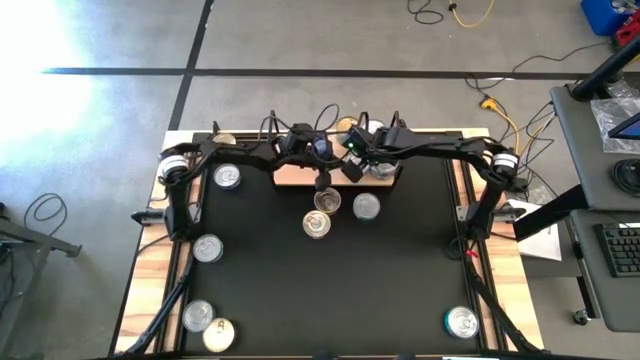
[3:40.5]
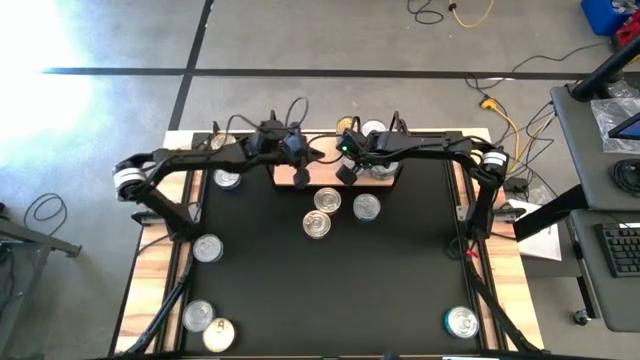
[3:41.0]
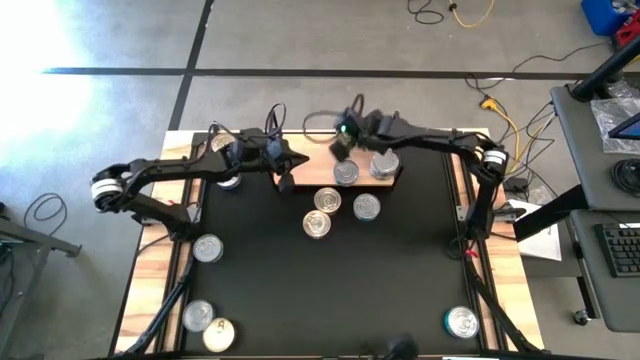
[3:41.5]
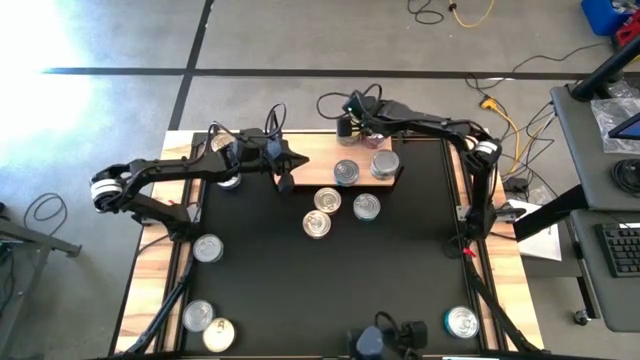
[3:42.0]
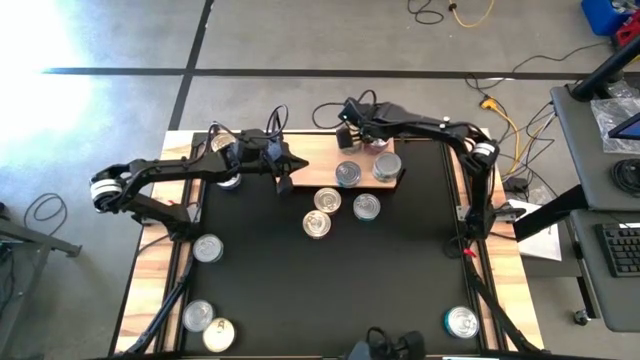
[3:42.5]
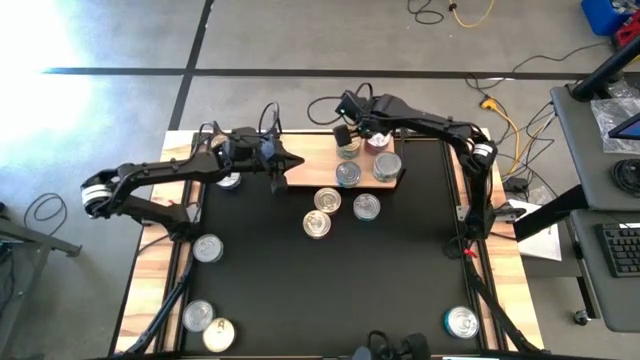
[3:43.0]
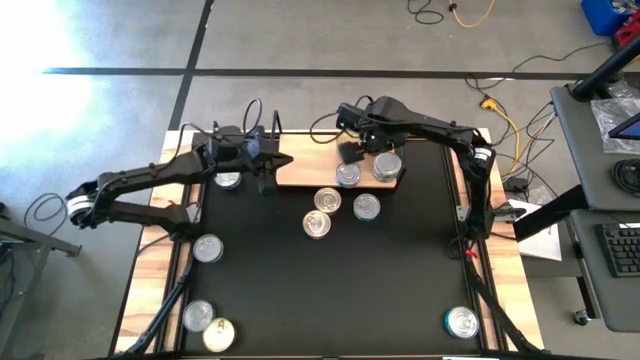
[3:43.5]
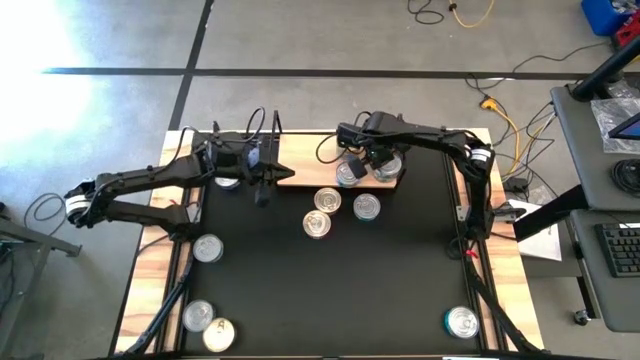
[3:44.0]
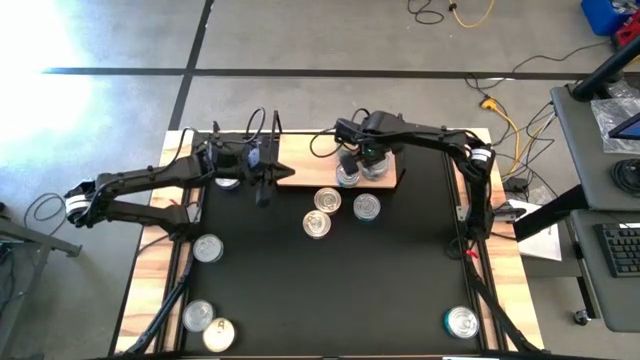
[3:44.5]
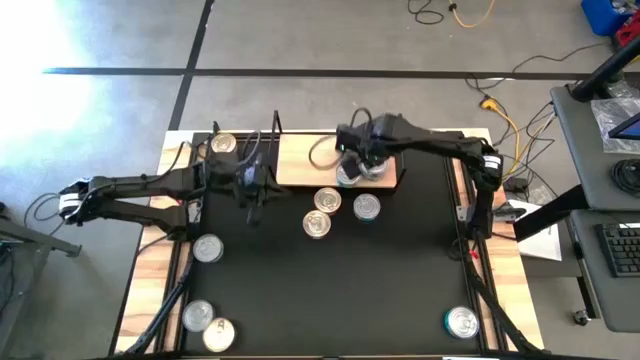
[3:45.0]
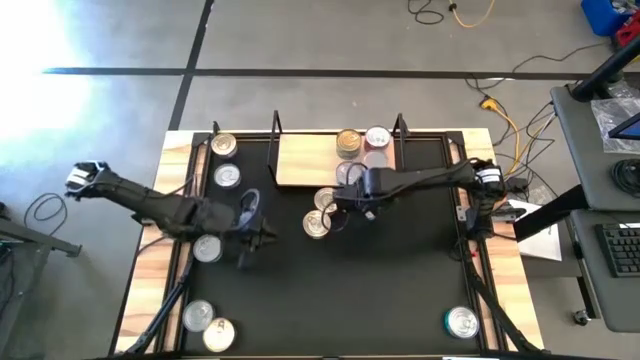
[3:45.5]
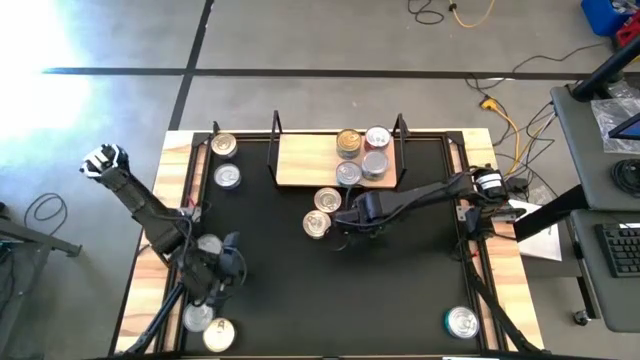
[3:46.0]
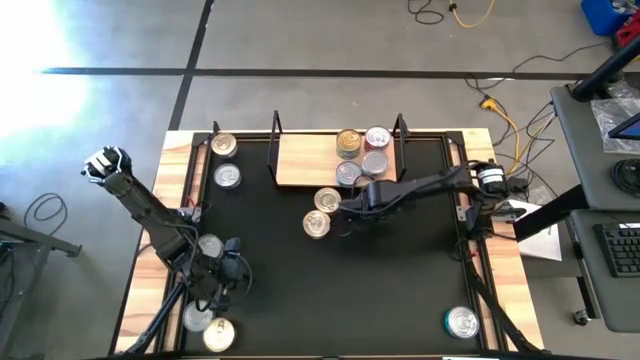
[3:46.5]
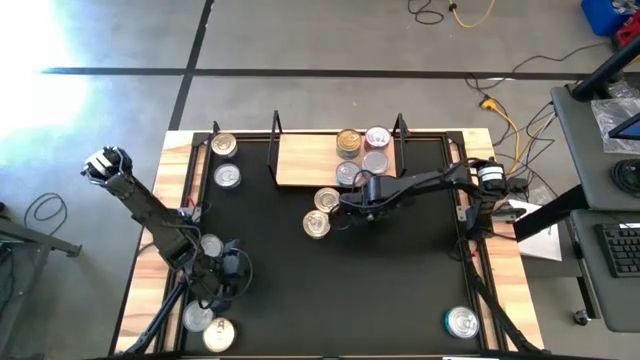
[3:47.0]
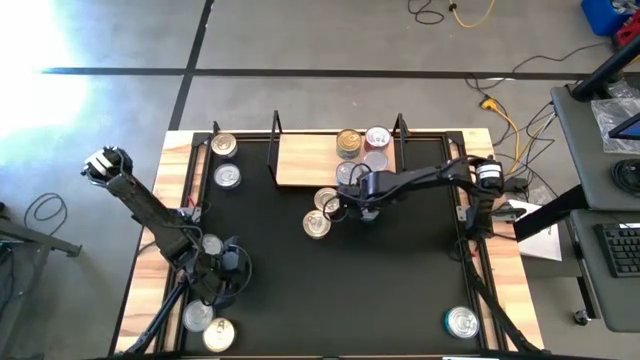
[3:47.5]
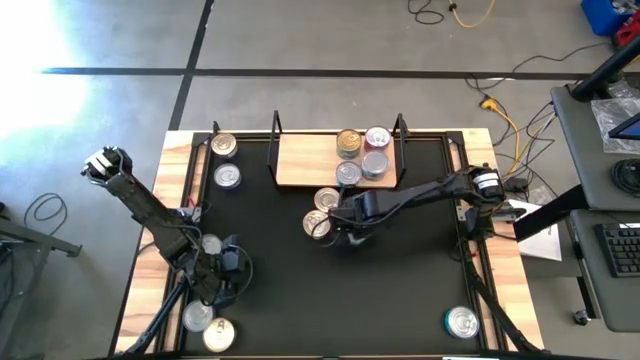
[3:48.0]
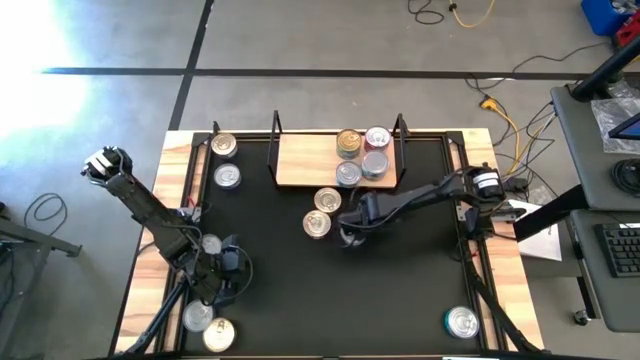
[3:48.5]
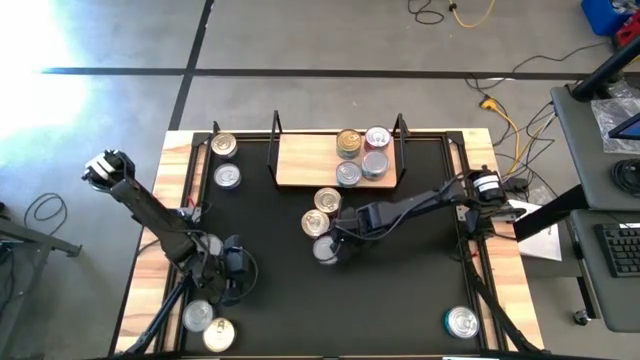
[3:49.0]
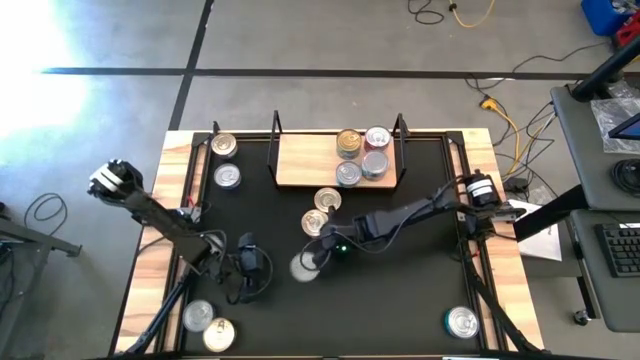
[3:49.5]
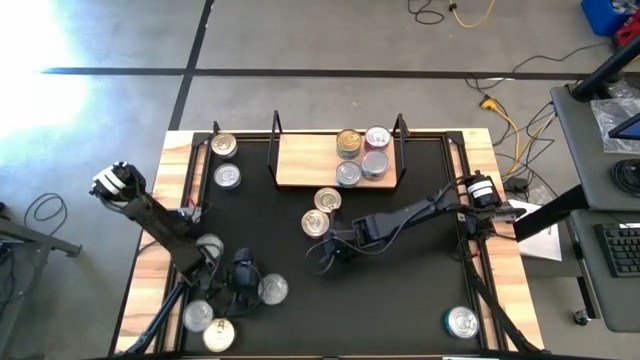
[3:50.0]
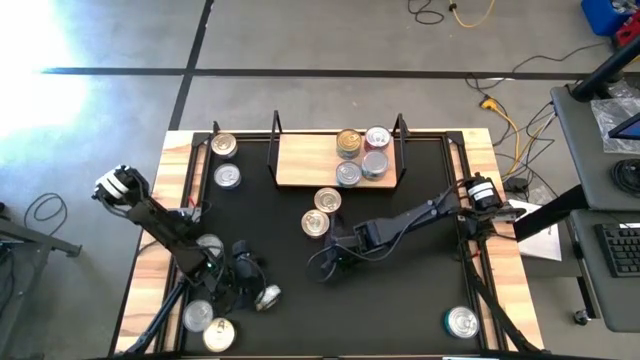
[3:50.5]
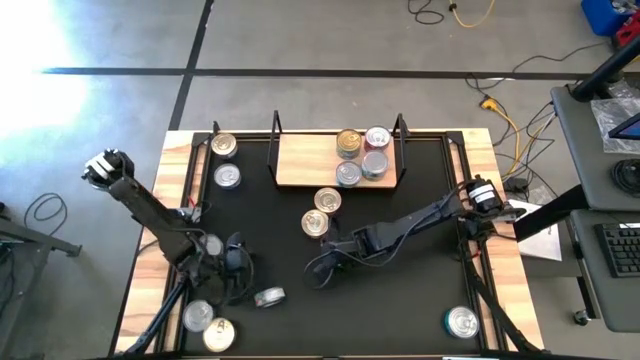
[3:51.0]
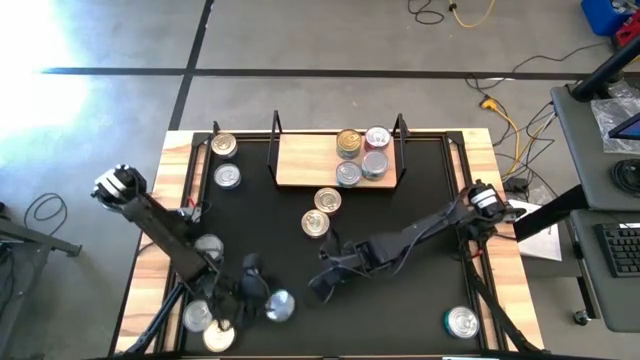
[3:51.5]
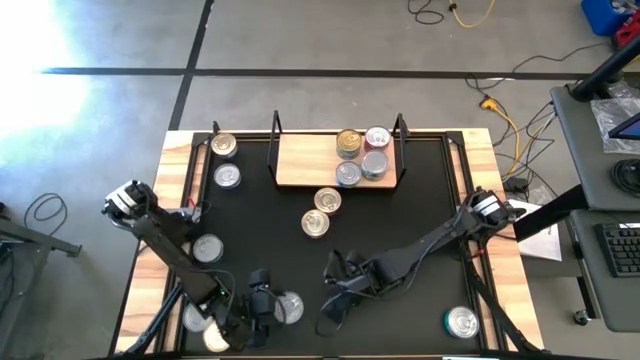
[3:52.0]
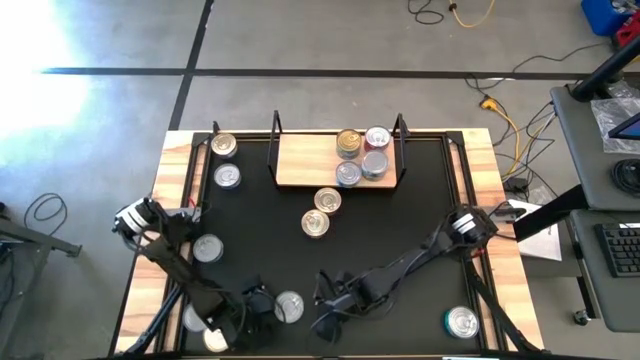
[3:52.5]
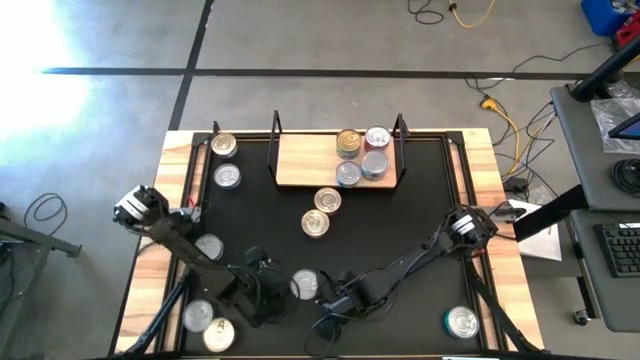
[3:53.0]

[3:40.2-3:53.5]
Task: Stack canned seafood by type on shelf
Stack the yellow-blue tuna can on top of the other yellow-blue tuna can on the shelf

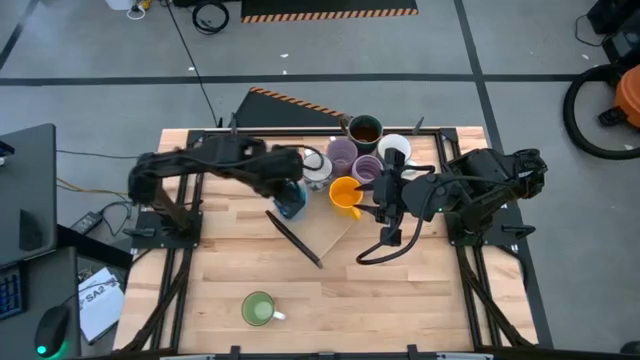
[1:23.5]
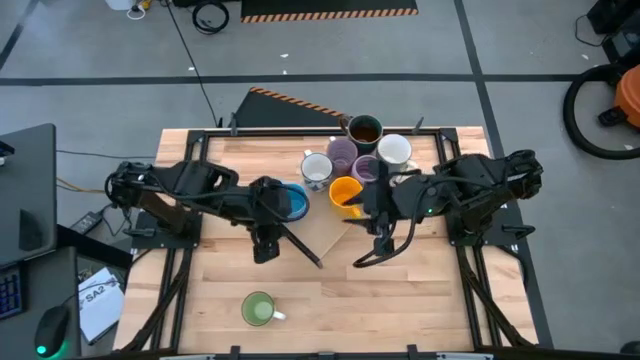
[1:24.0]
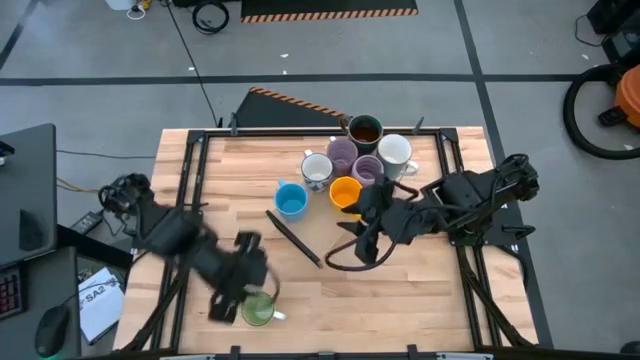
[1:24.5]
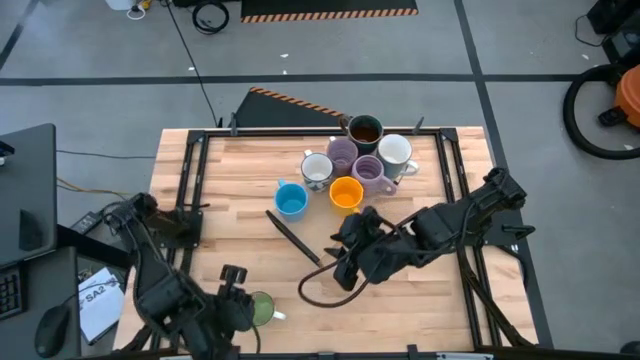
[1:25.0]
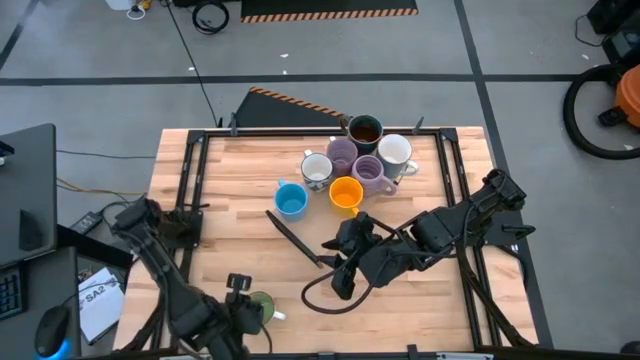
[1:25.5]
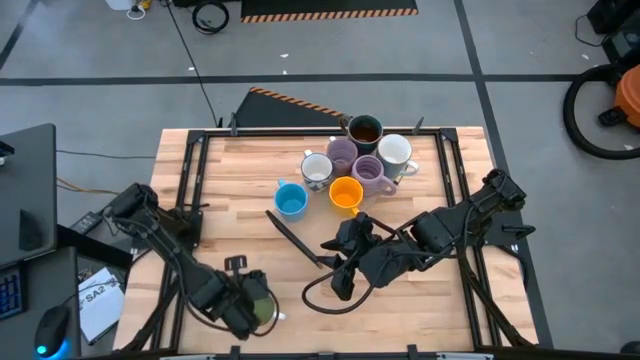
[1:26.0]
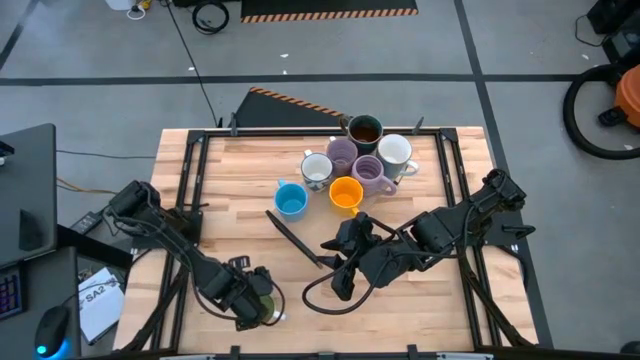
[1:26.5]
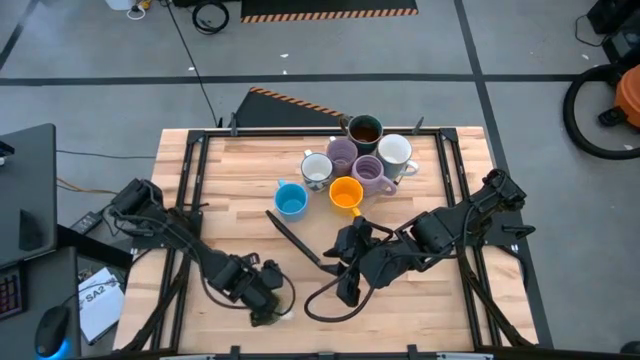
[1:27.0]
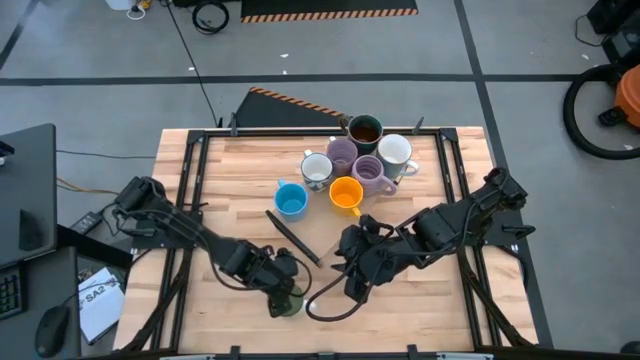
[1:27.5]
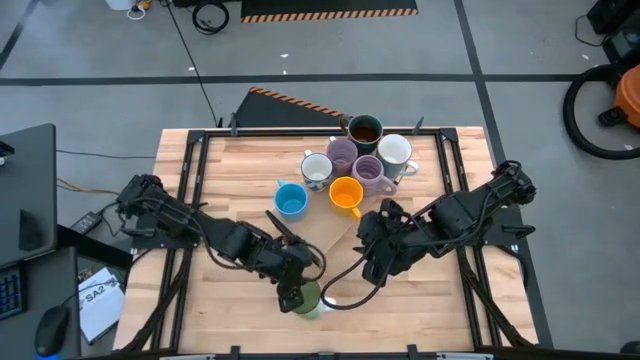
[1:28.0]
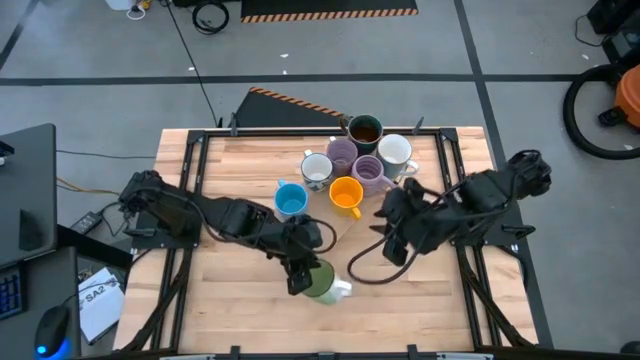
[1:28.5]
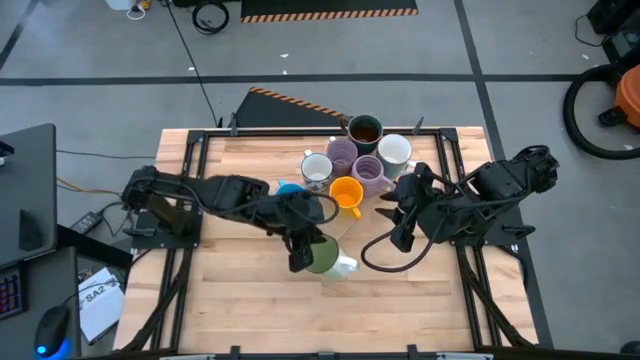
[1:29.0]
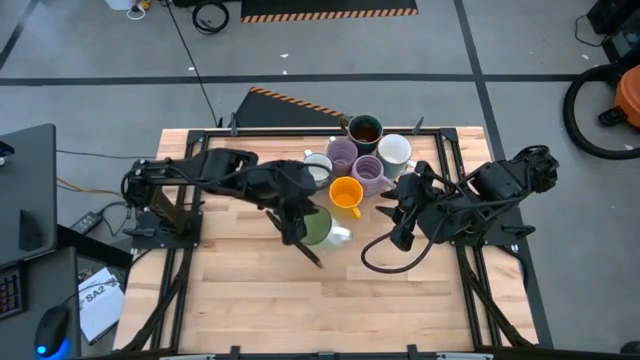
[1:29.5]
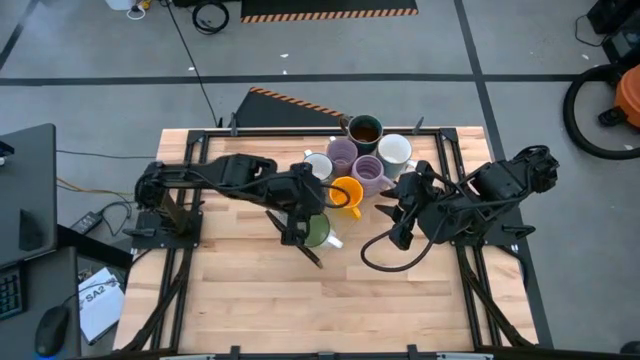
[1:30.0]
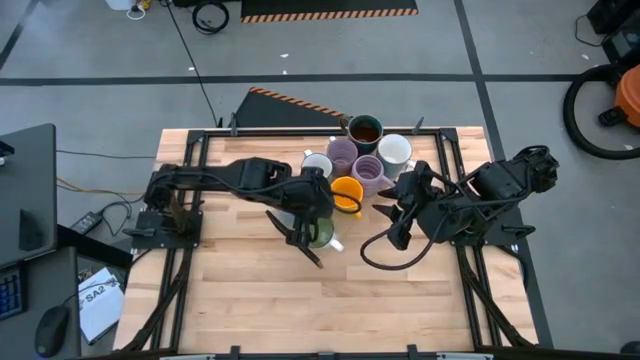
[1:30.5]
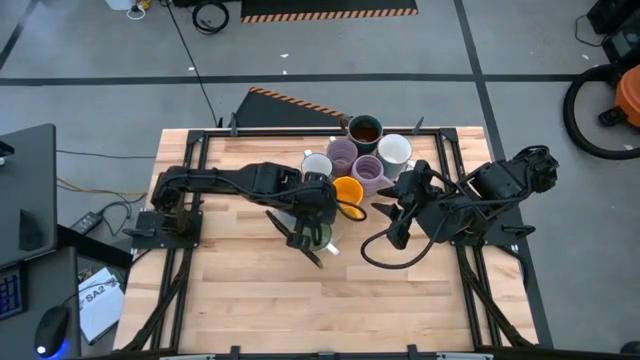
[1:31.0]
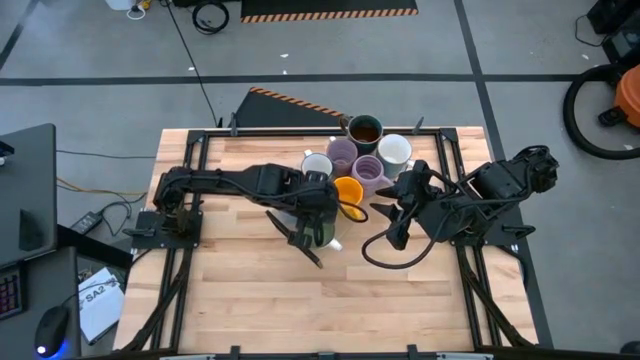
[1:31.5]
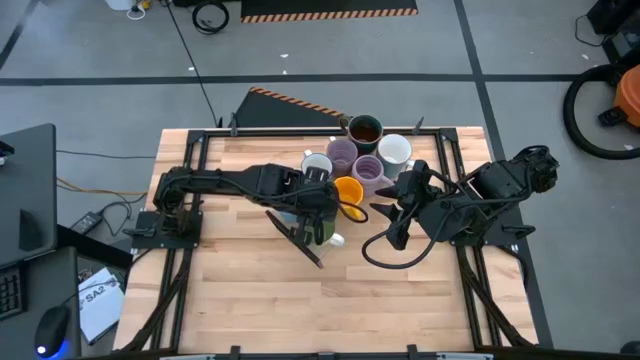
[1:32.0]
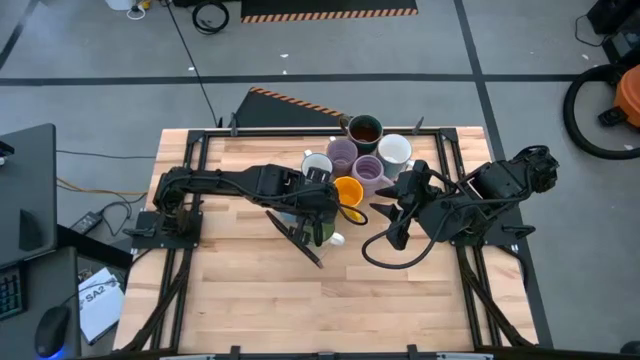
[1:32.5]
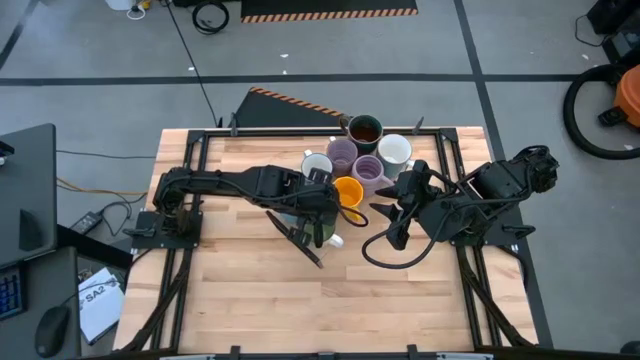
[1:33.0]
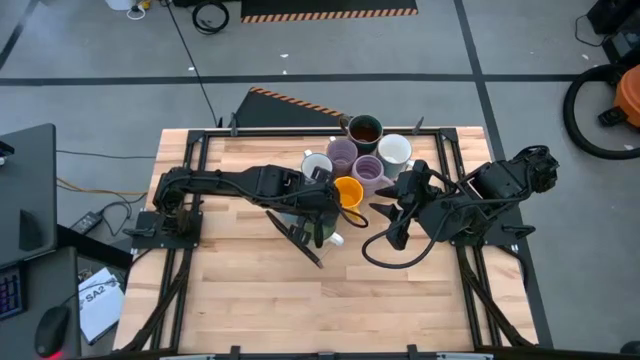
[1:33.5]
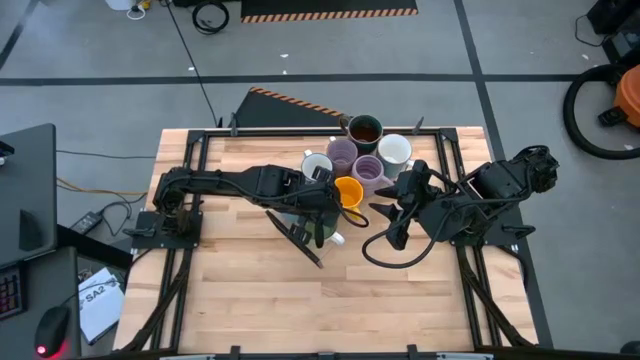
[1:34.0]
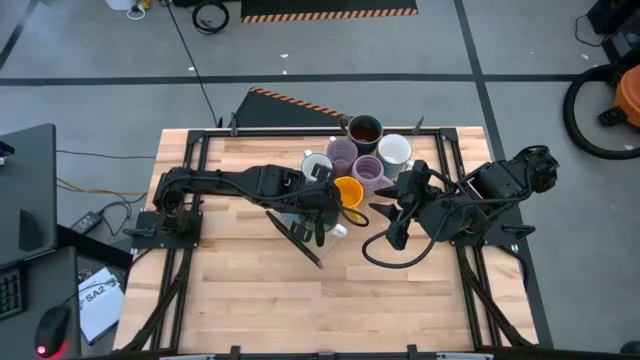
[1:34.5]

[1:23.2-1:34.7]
Task: Place coffee mugs
Put the green mug on the shelf
